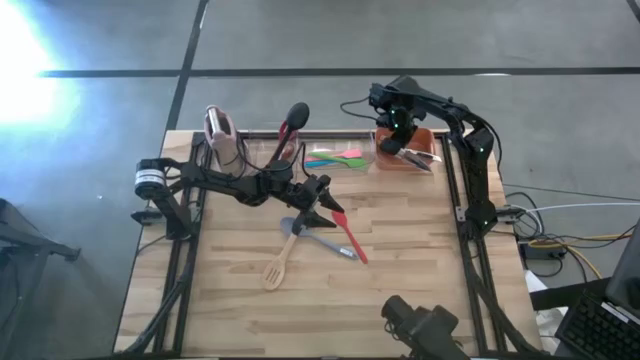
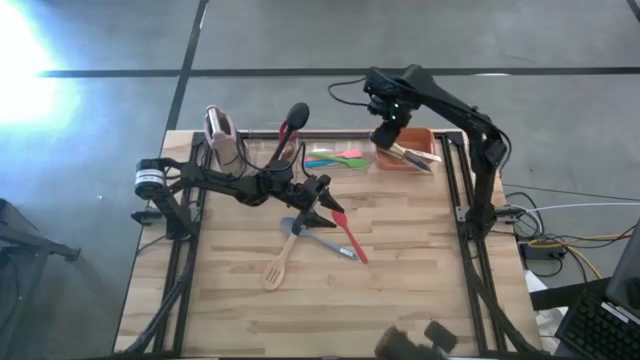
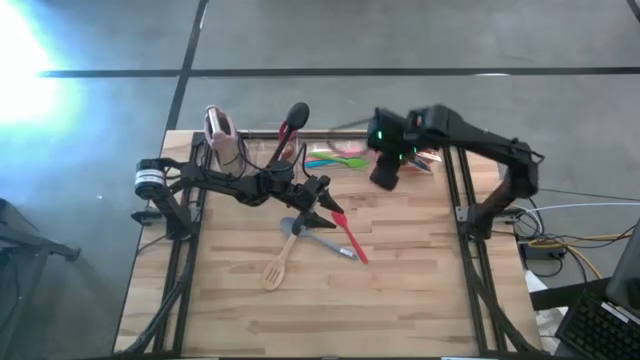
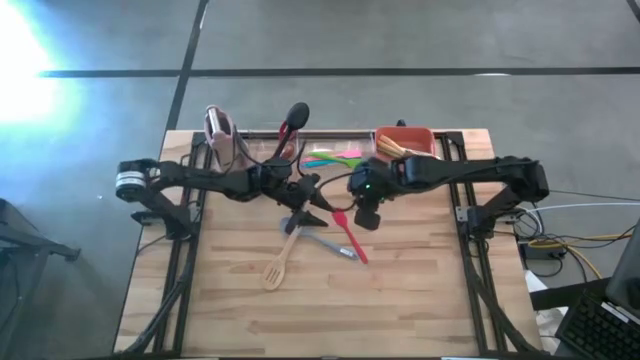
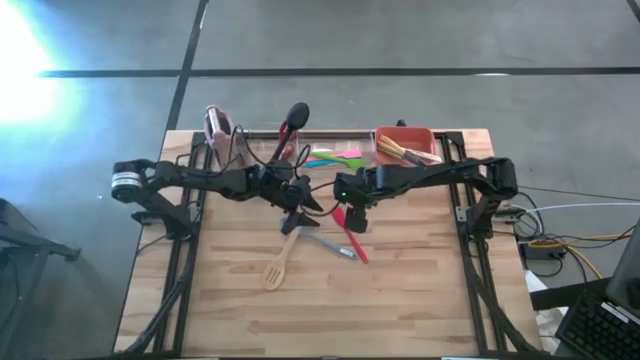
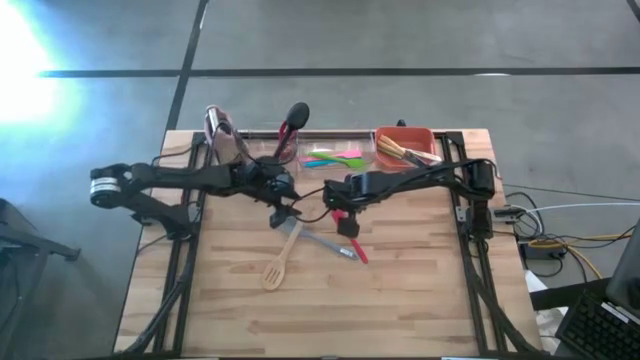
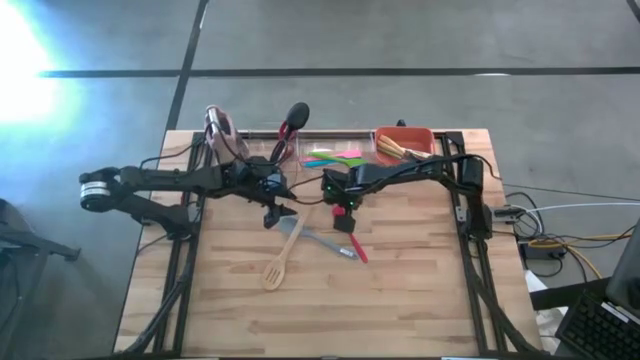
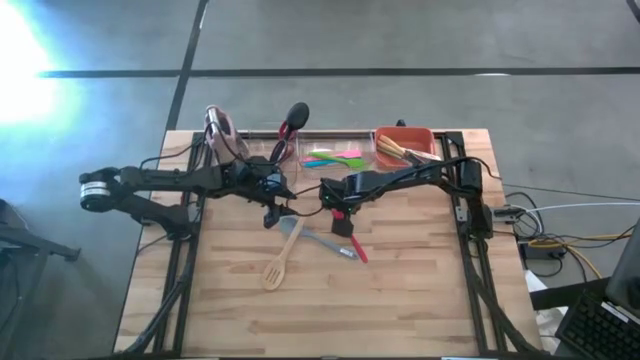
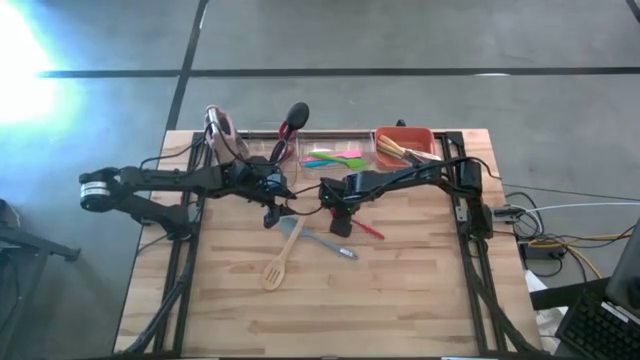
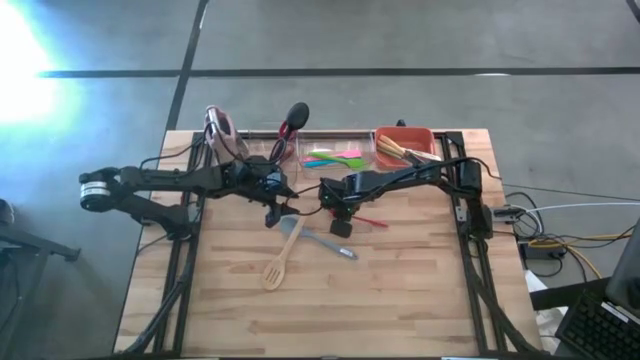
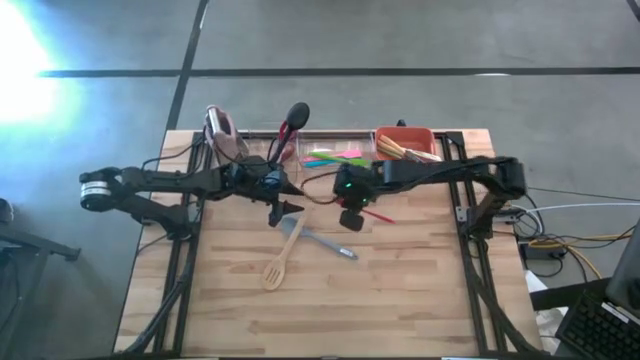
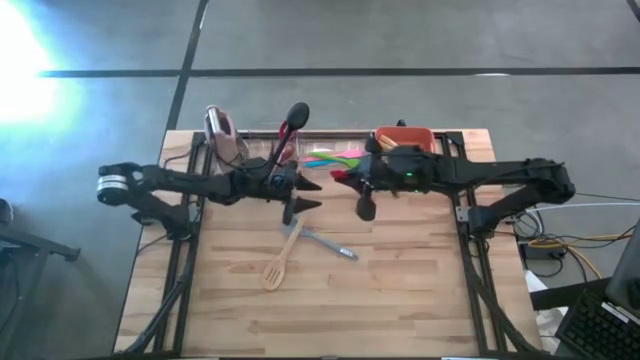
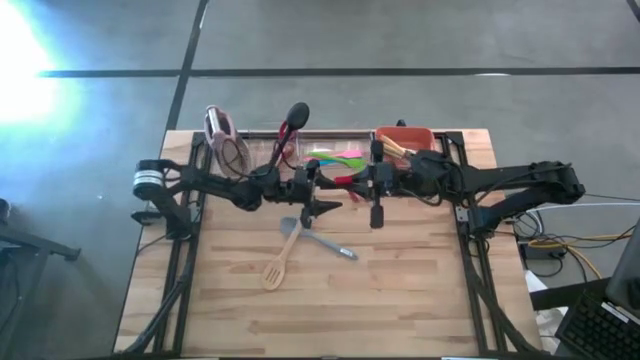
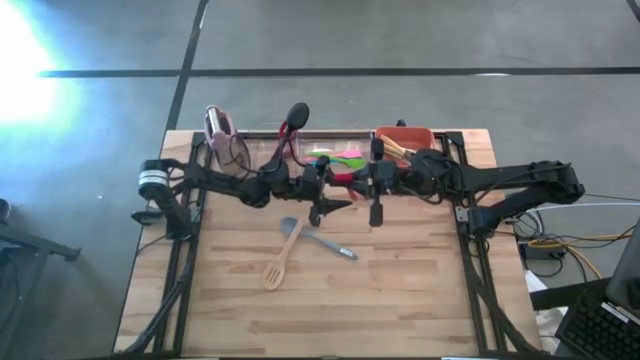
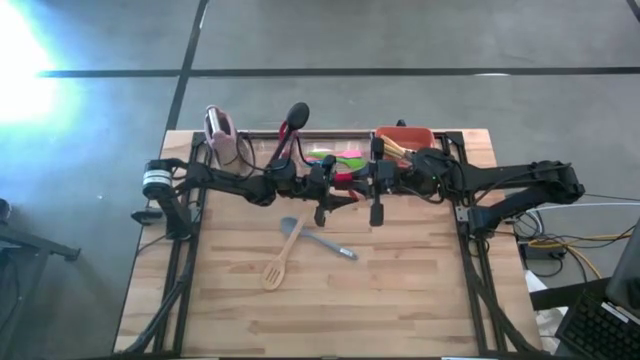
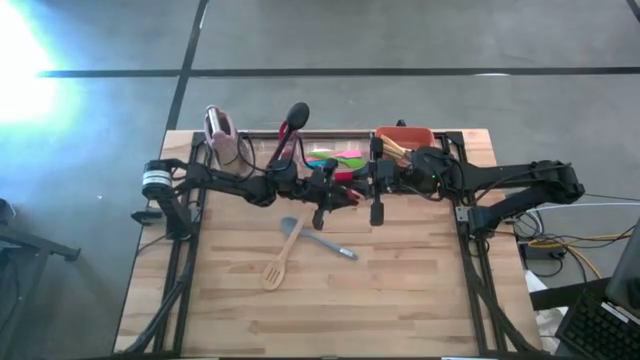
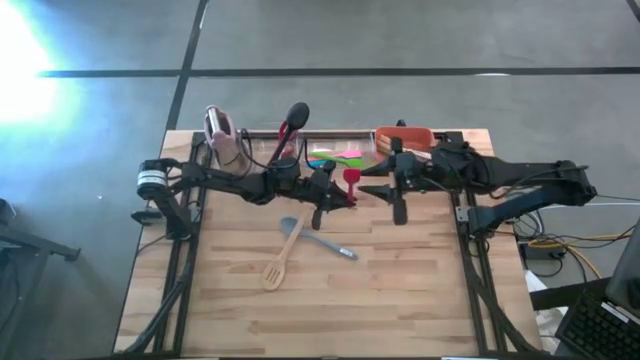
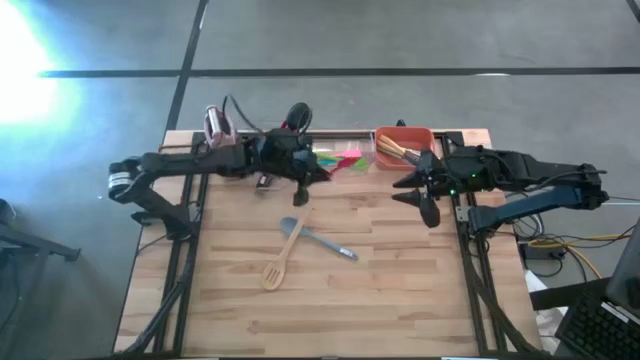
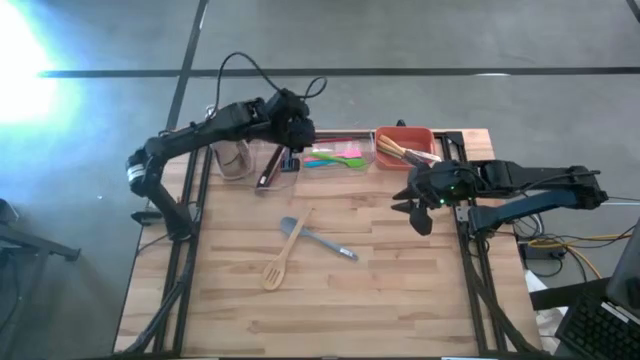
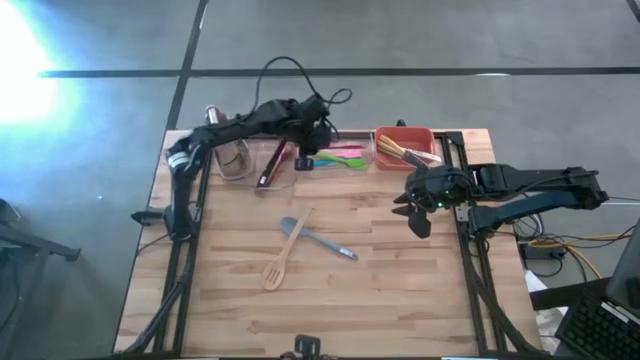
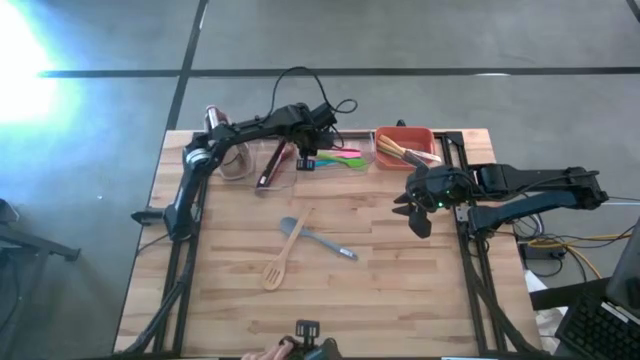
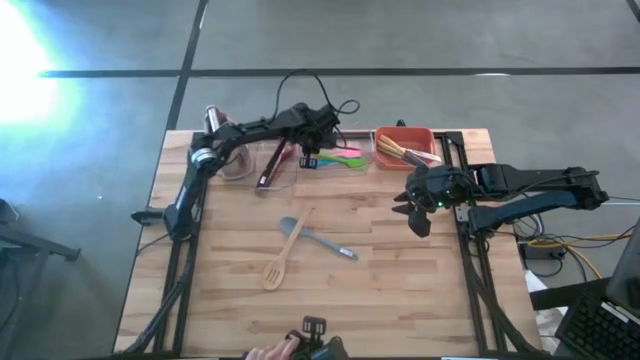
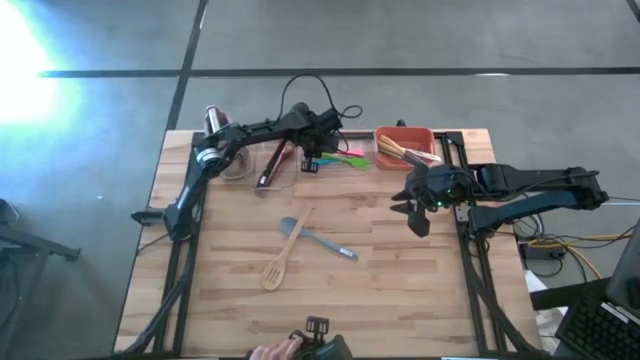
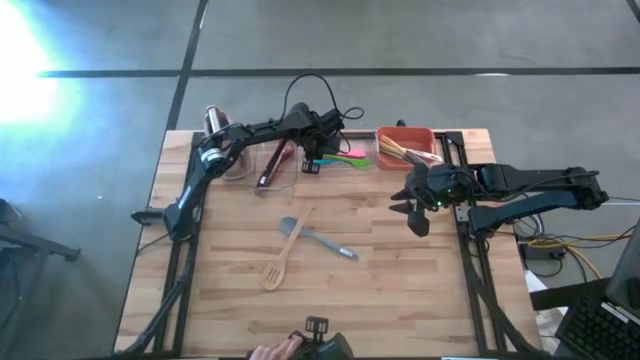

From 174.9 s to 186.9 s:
Task: Pick & Place Kitchen Items
Put the red spatula into the right transparent bin

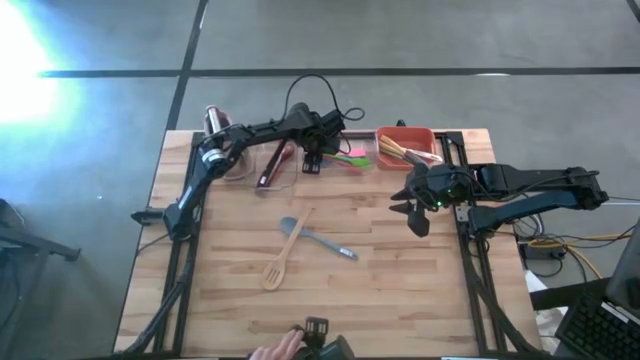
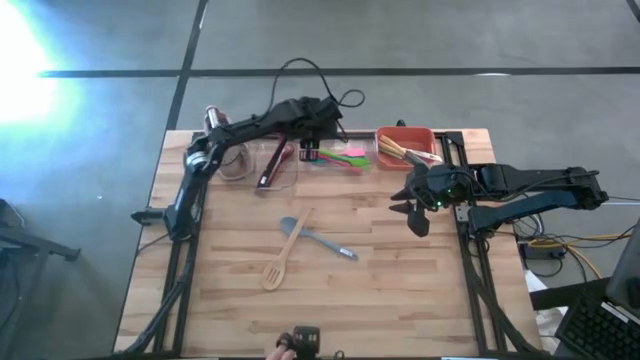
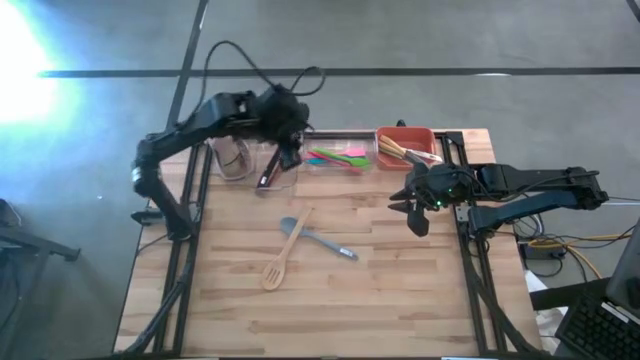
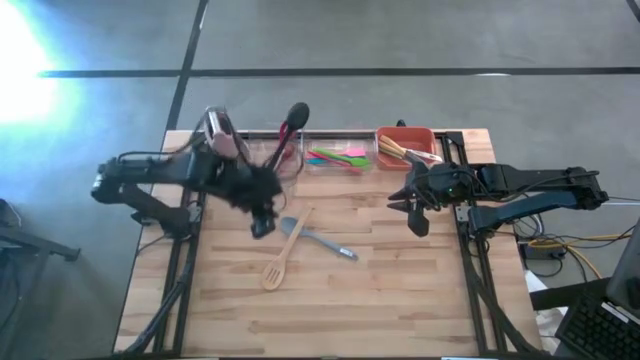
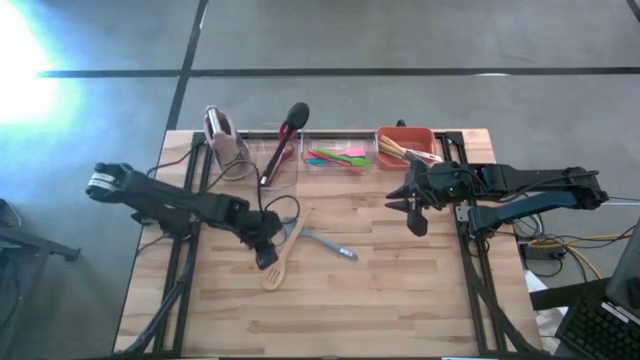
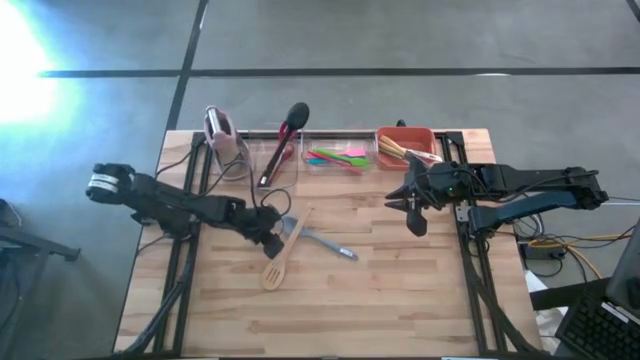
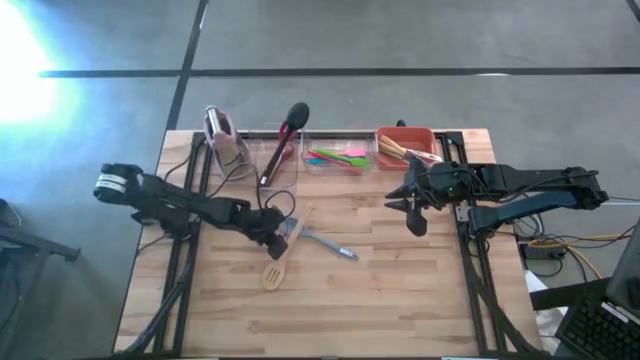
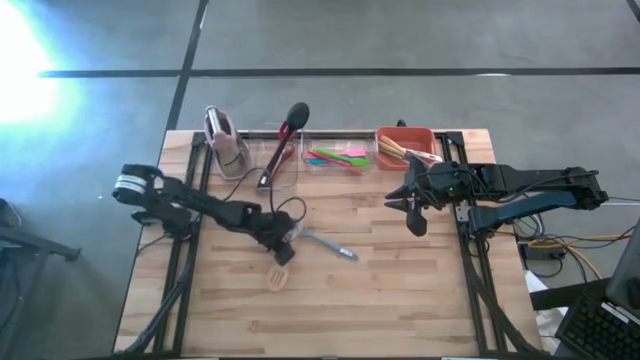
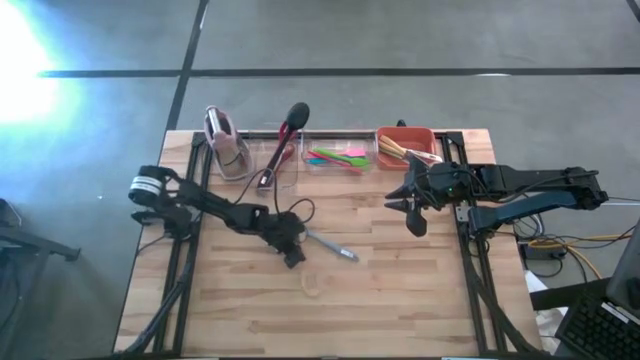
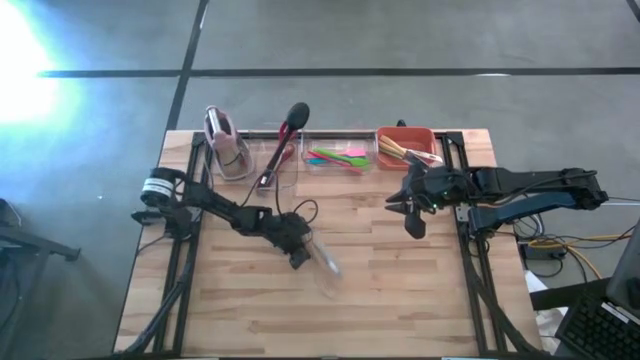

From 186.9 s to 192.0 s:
Put the light brown serving spoon into the left transparent bin

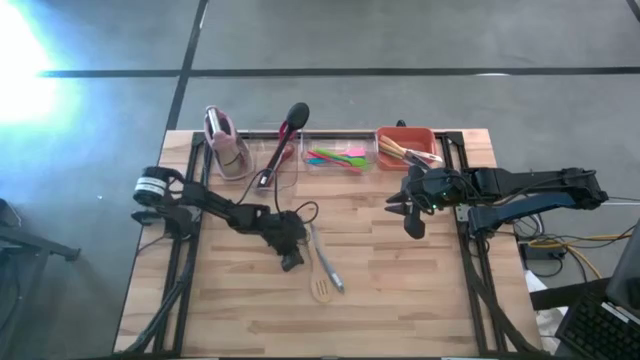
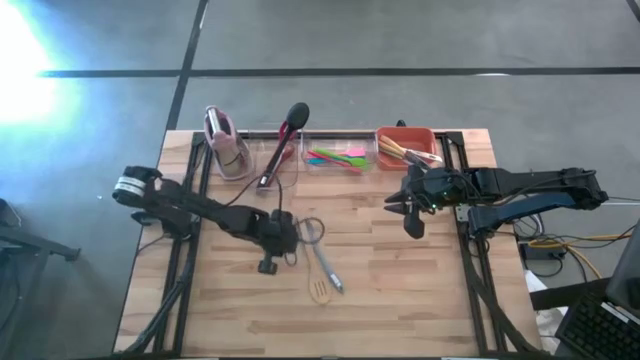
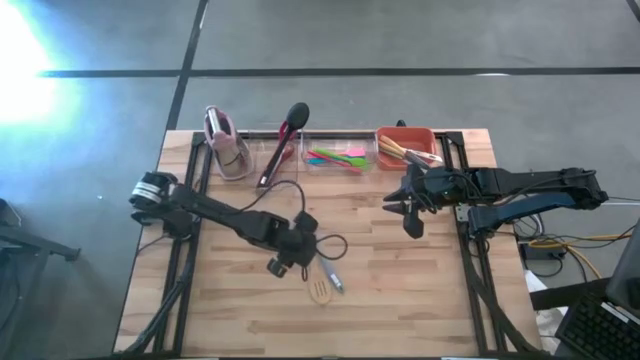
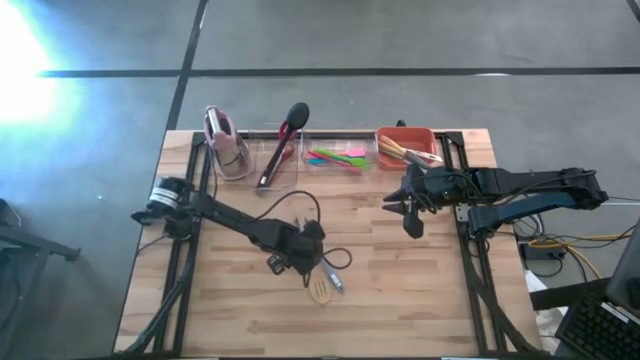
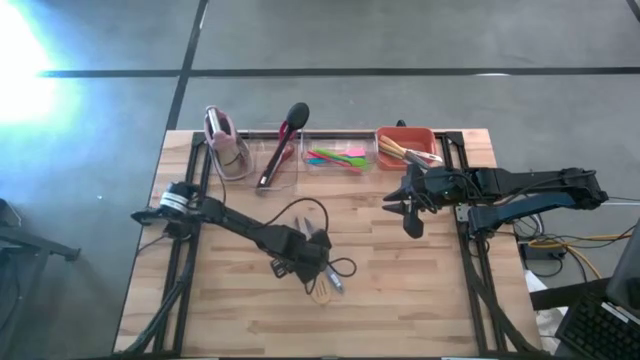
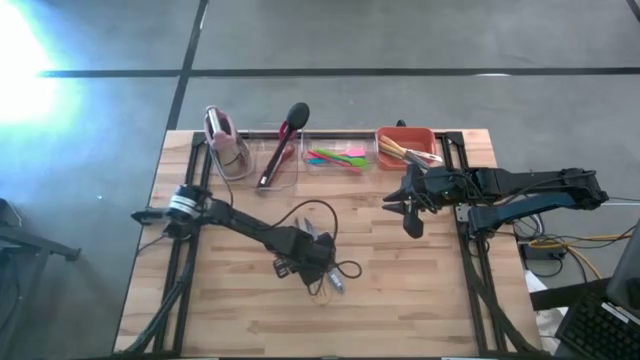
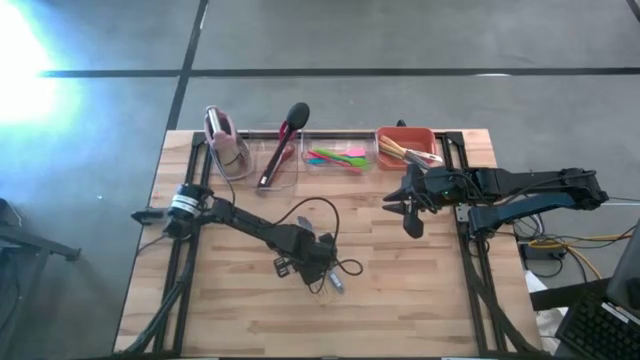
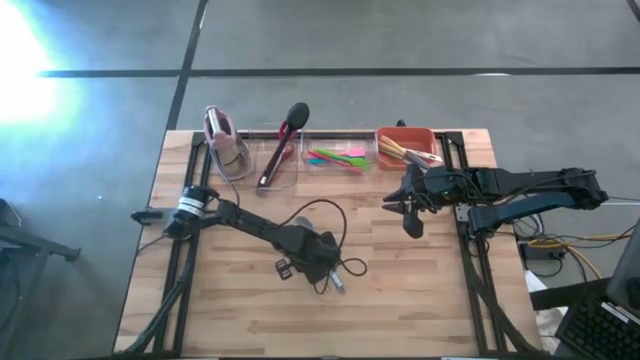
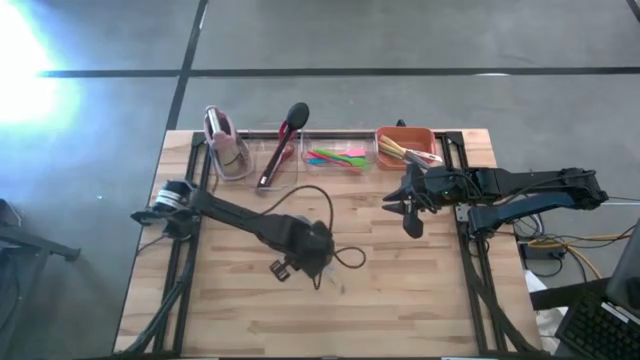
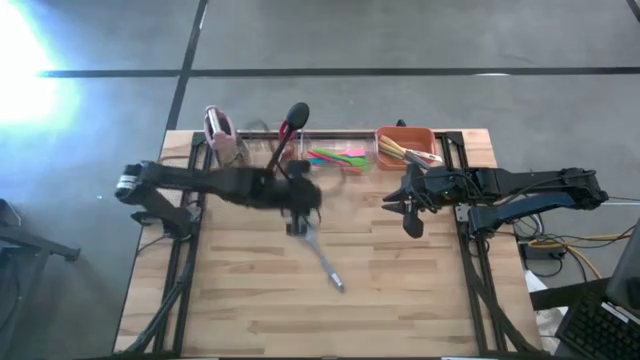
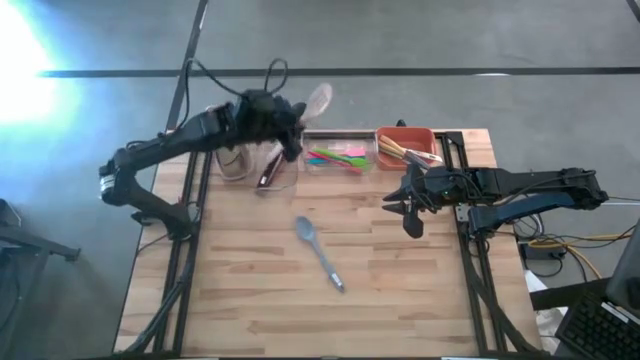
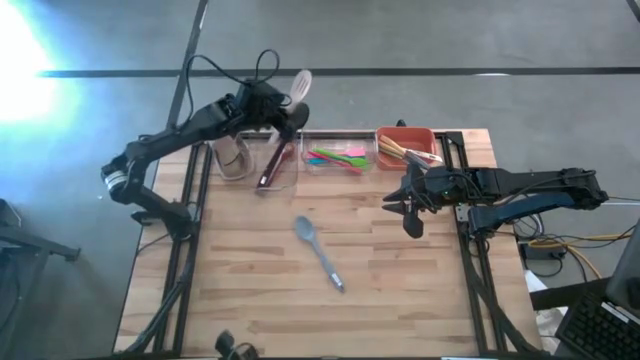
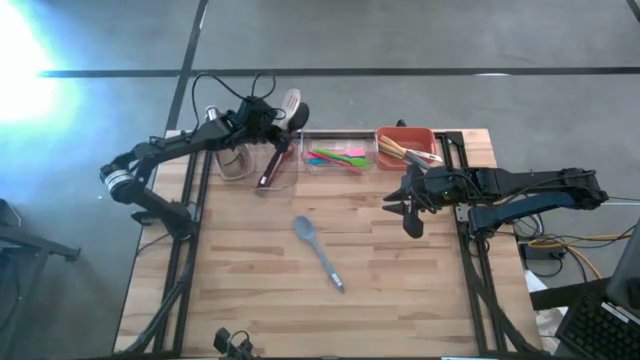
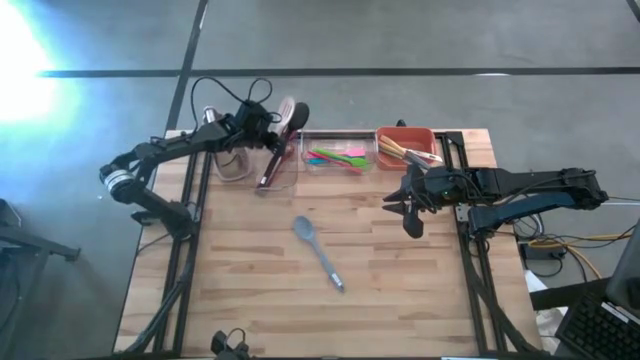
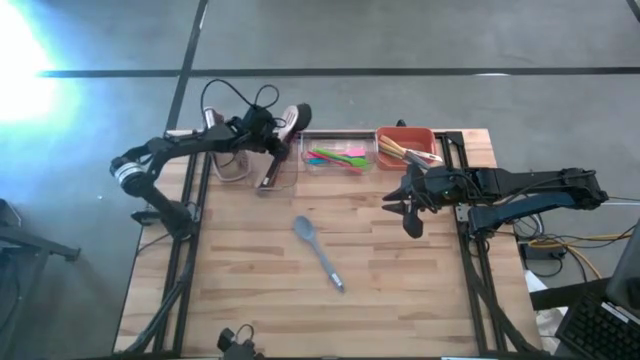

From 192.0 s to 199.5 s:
Put the light brown serving spoon into the left transparent bin
